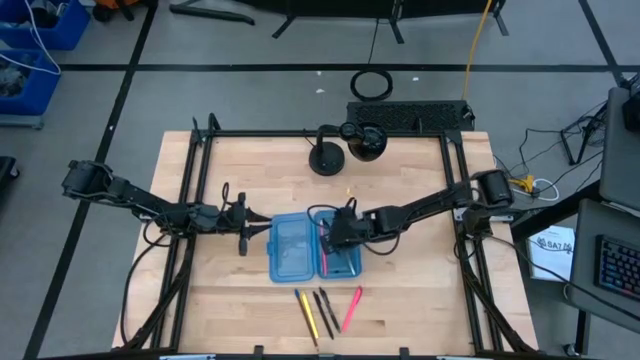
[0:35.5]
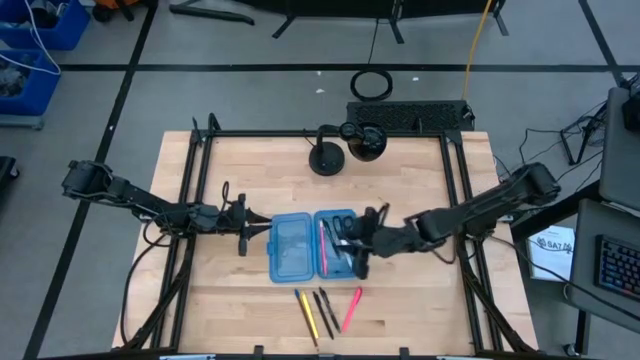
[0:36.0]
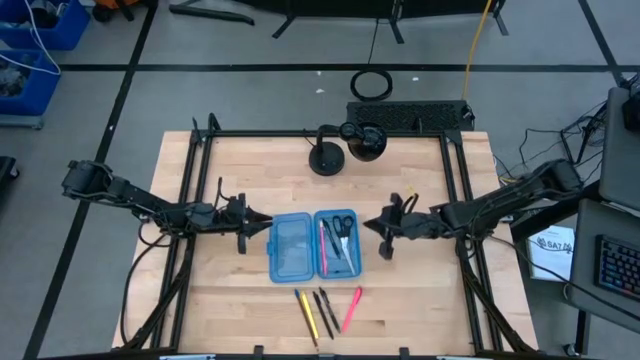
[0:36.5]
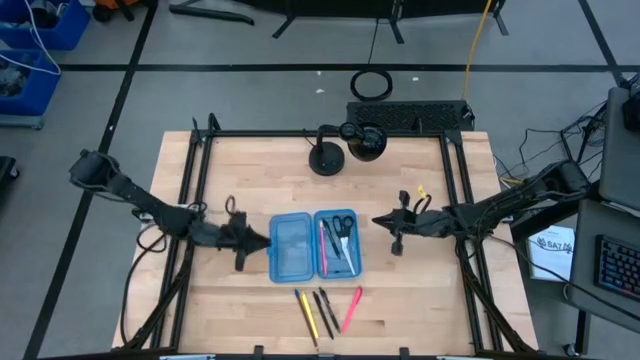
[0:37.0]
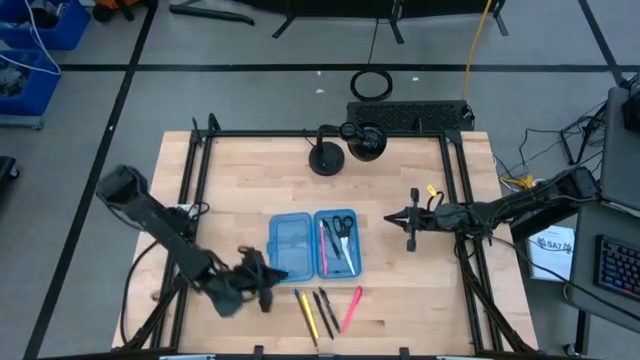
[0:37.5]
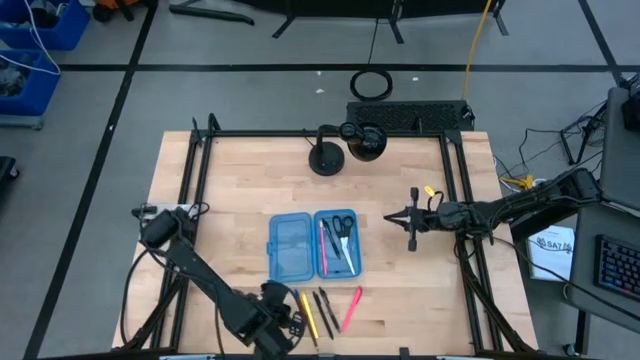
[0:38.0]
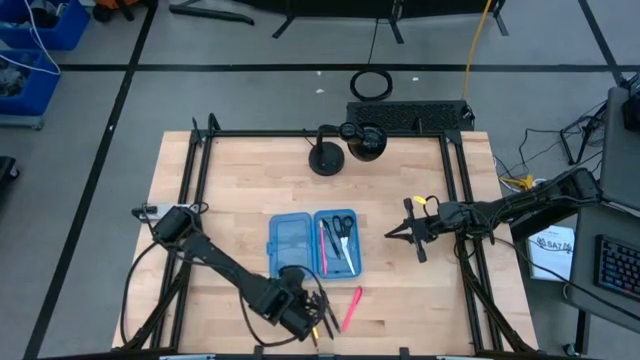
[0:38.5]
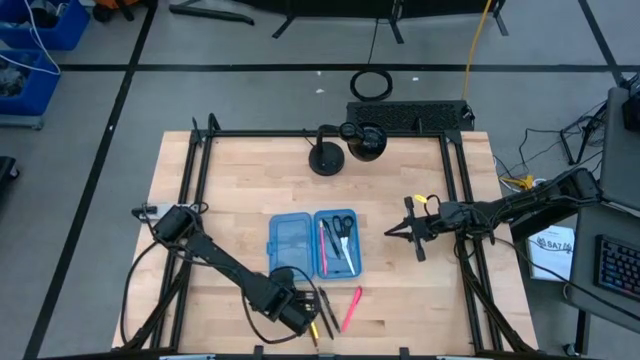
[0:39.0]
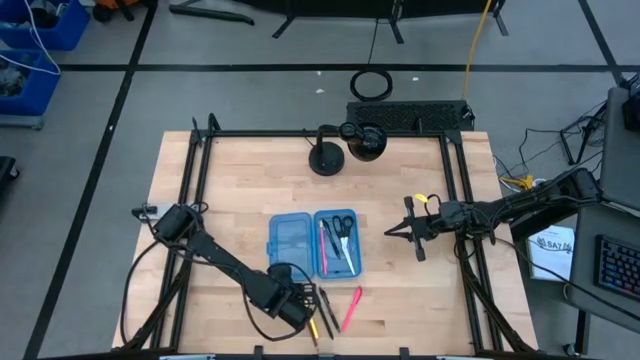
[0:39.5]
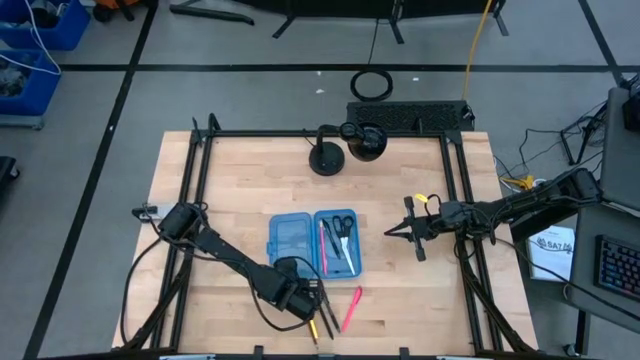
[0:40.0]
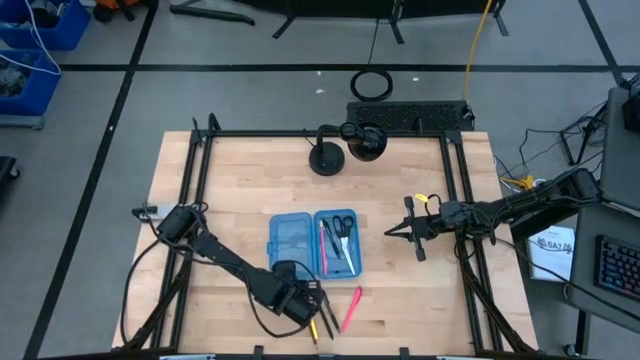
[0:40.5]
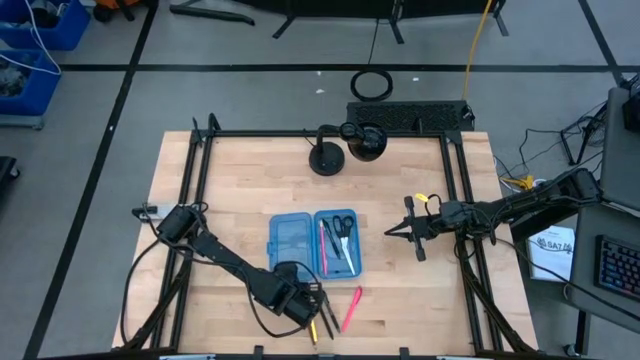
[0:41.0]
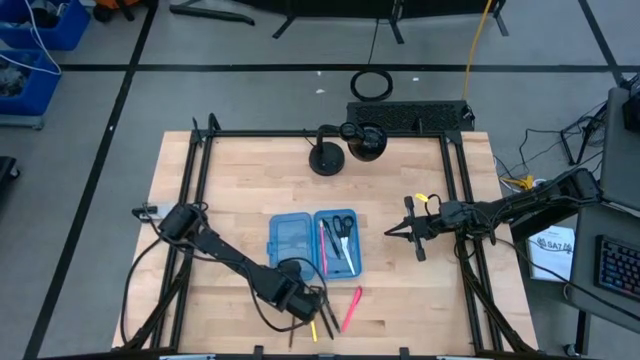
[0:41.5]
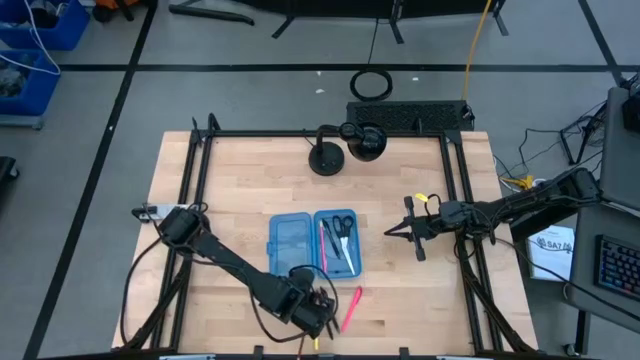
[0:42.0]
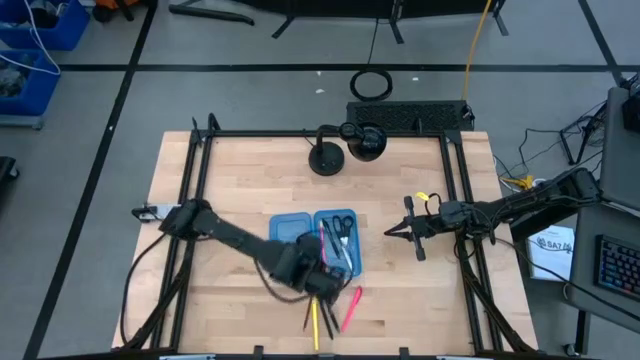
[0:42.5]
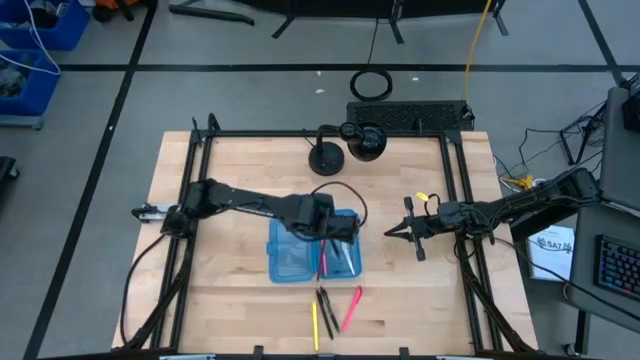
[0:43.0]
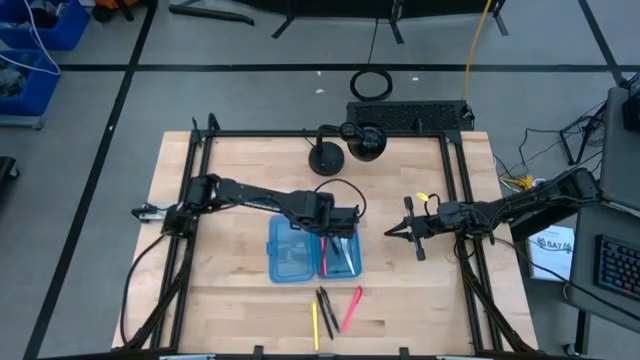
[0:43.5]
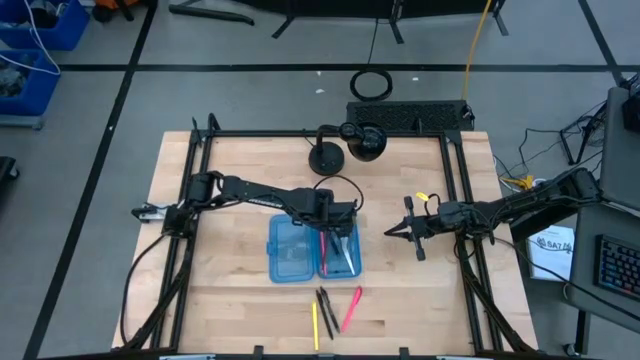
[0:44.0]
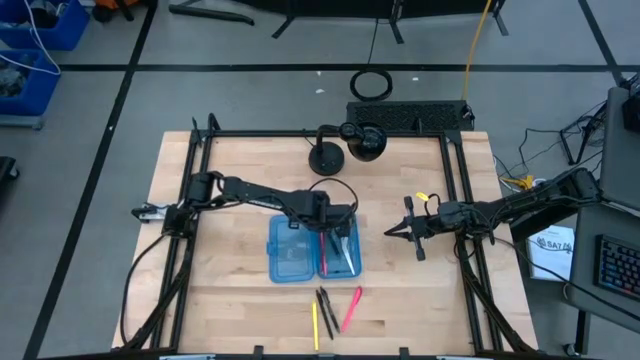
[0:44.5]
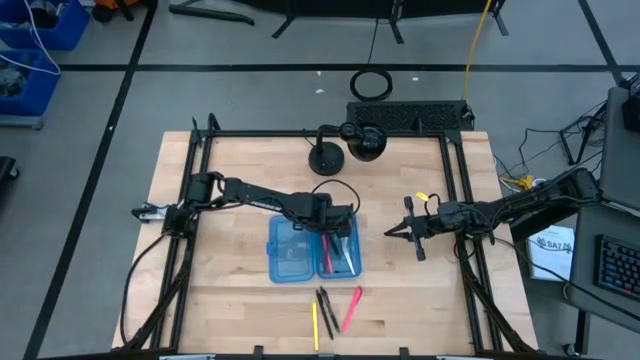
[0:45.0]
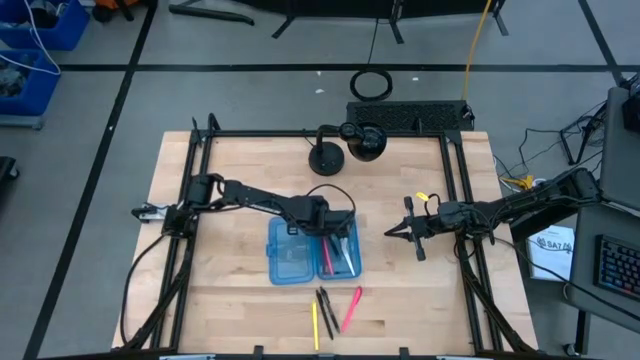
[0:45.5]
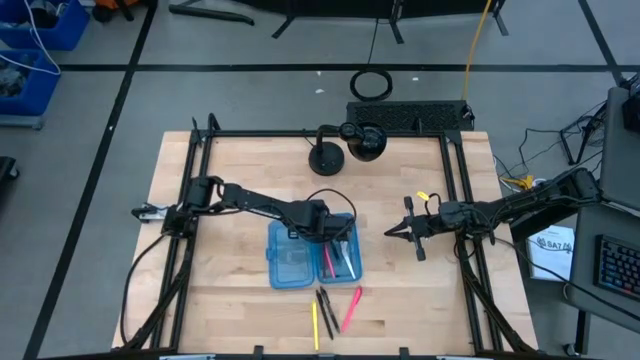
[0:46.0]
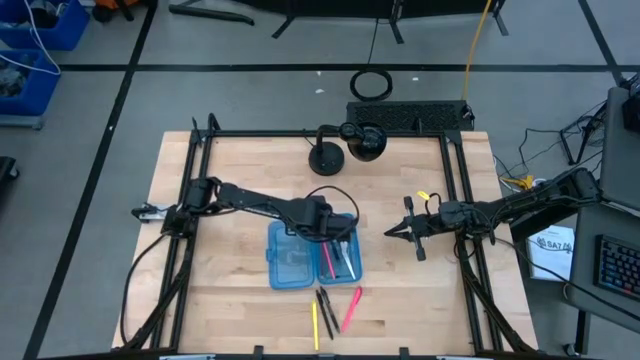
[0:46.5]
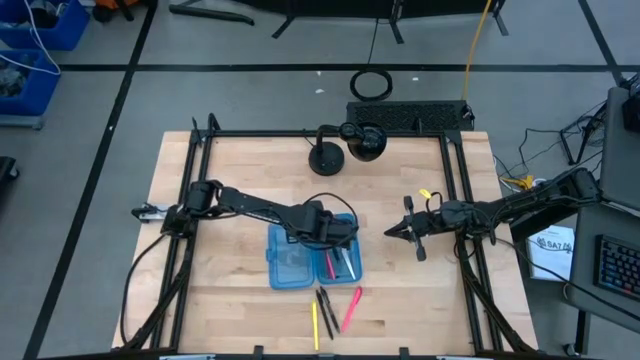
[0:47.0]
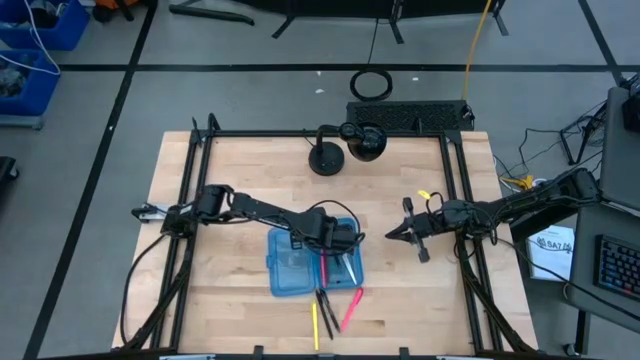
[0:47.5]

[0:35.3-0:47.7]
Task: Pick & place school supplies into a supply box
Put the brown pencil into the blue supply box

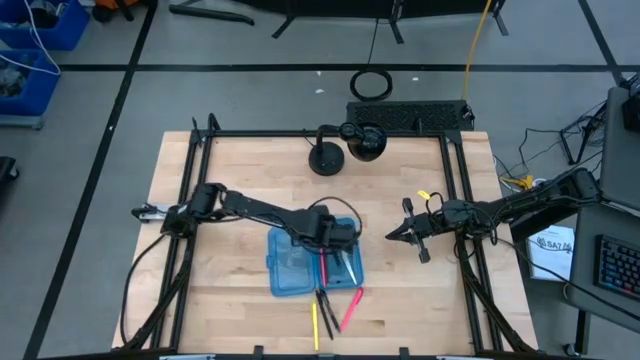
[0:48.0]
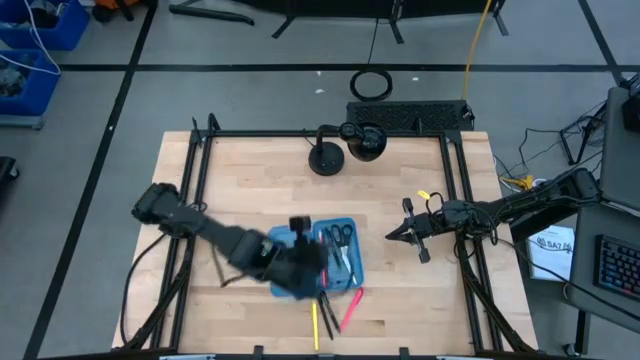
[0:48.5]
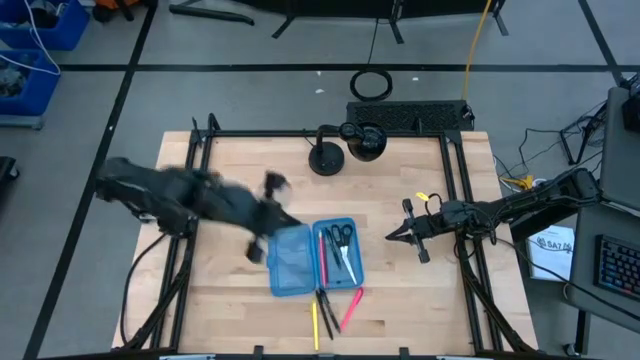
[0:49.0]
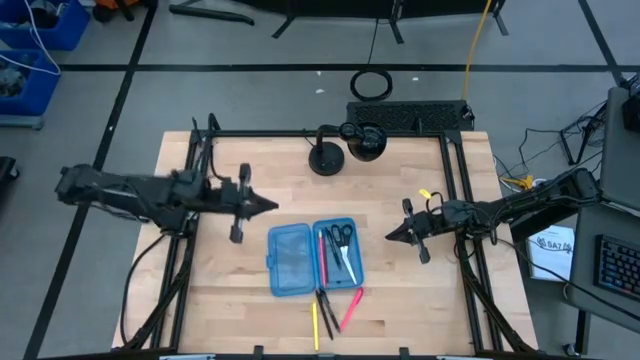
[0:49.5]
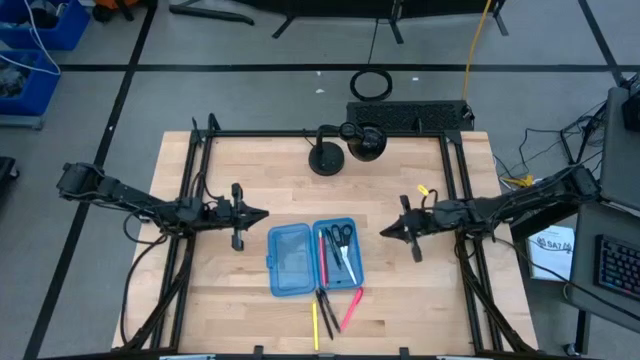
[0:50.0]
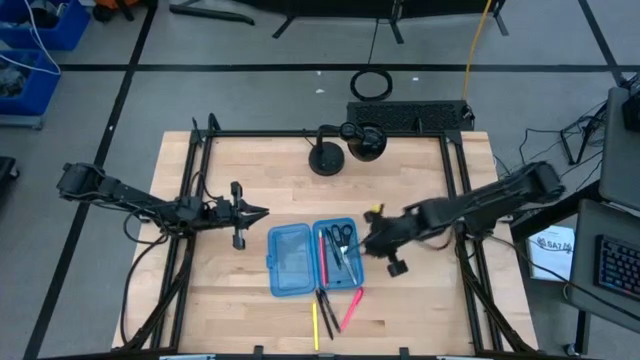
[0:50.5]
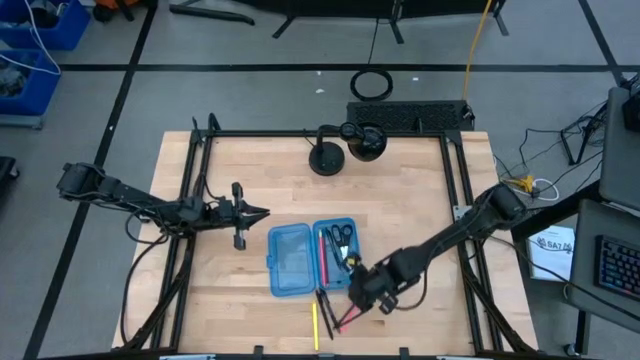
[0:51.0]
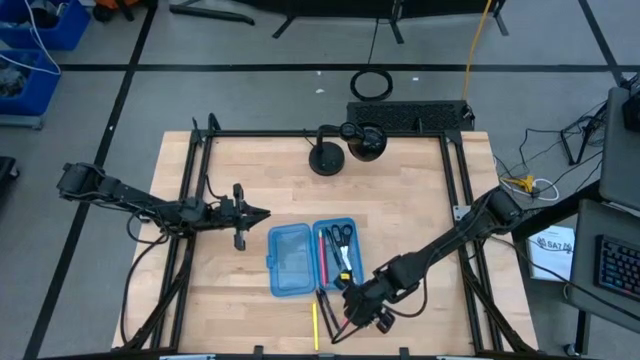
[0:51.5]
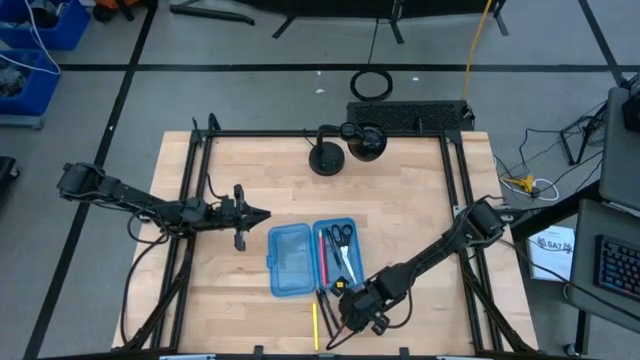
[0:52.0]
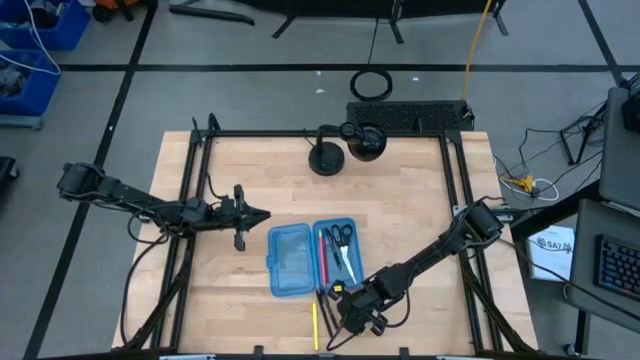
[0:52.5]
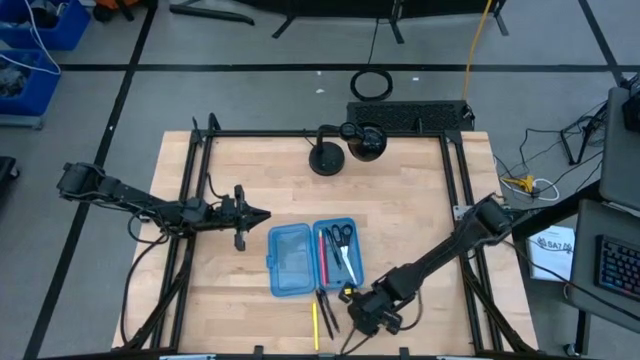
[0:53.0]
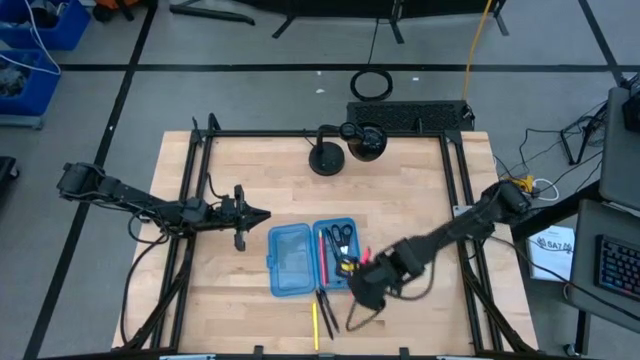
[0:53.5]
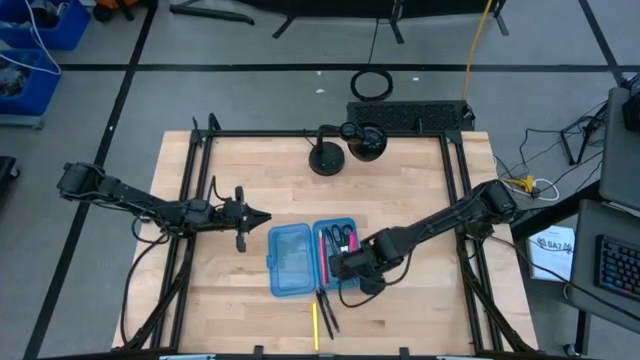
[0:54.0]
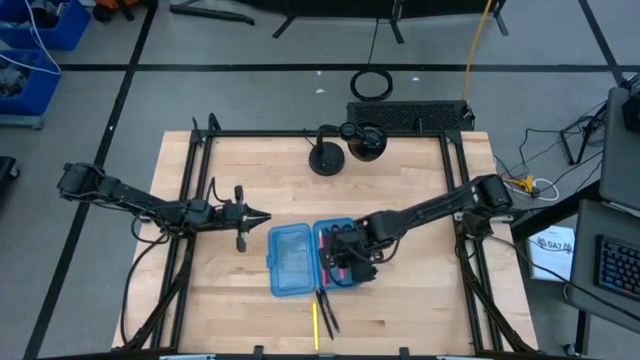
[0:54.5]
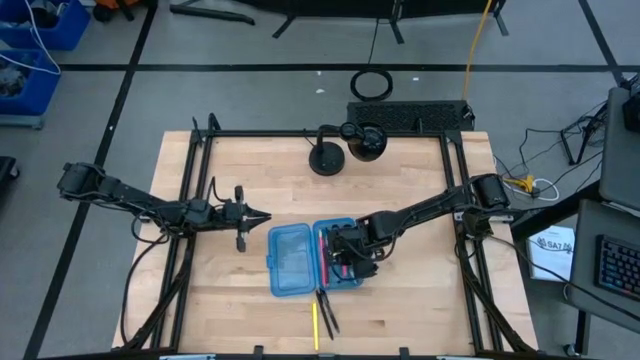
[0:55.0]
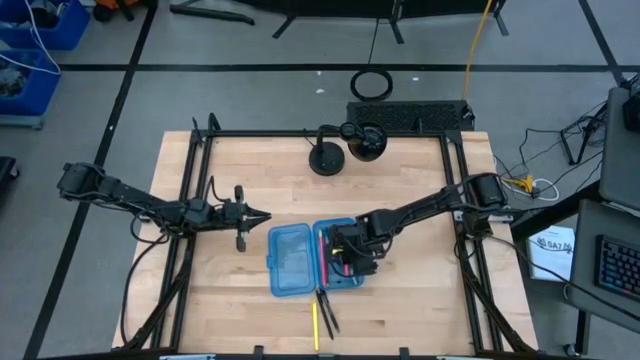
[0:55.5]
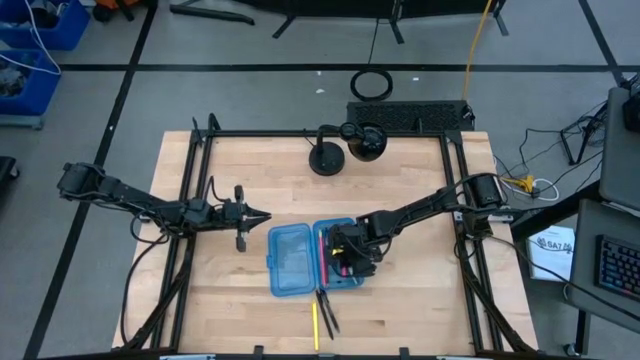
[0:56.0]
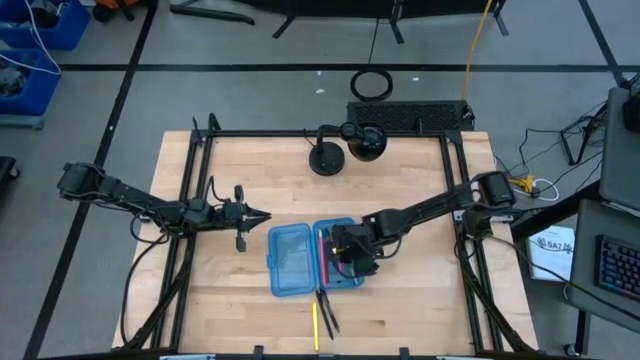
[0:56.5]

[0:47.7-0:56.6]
Put the pink pen into the blue supply box
